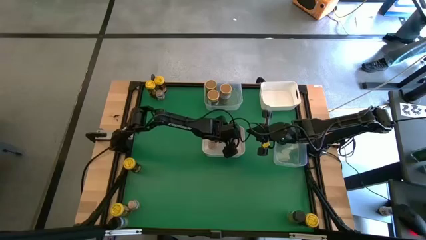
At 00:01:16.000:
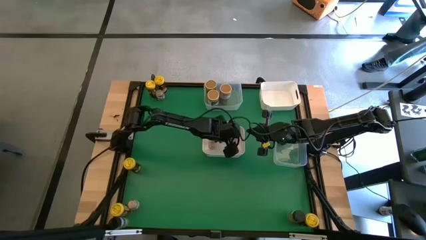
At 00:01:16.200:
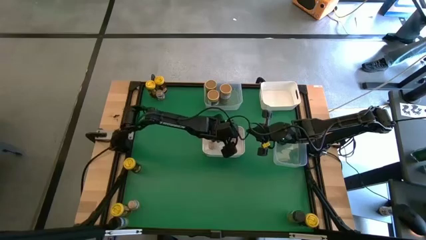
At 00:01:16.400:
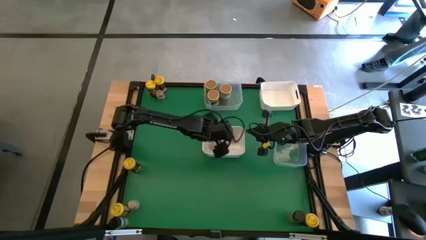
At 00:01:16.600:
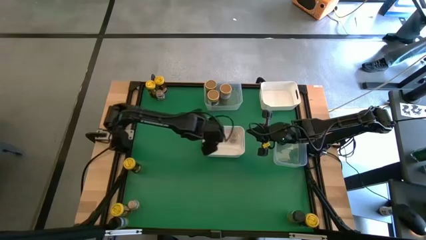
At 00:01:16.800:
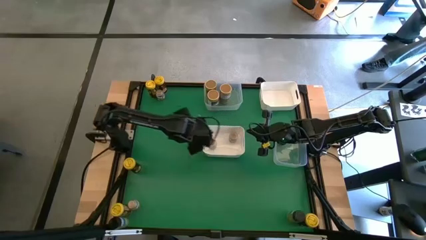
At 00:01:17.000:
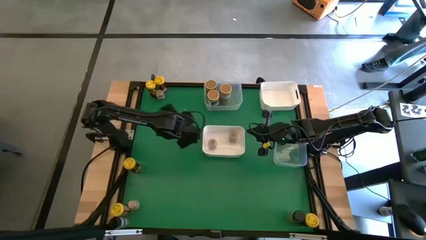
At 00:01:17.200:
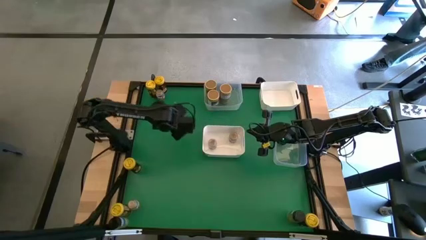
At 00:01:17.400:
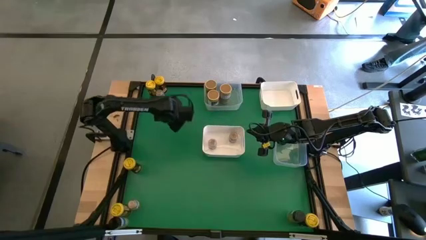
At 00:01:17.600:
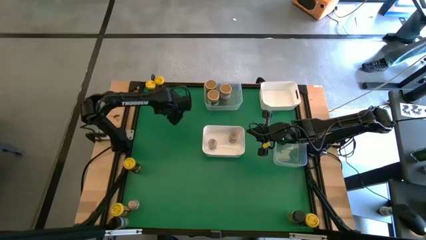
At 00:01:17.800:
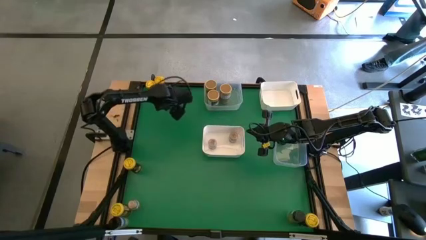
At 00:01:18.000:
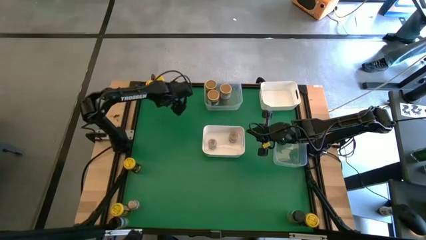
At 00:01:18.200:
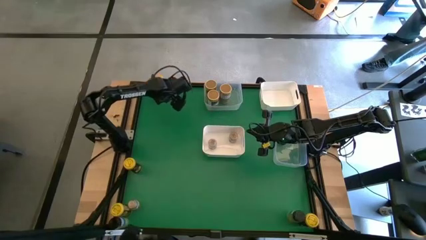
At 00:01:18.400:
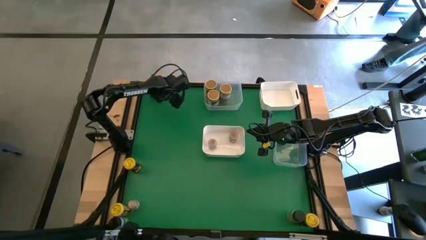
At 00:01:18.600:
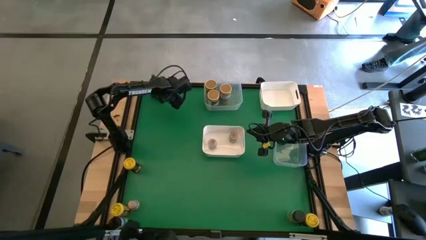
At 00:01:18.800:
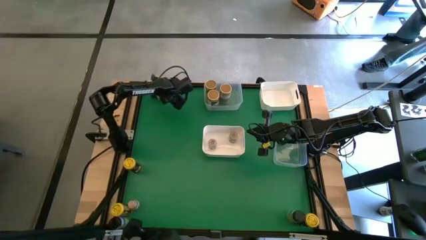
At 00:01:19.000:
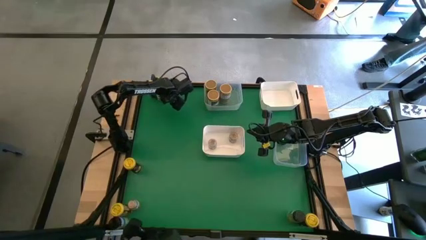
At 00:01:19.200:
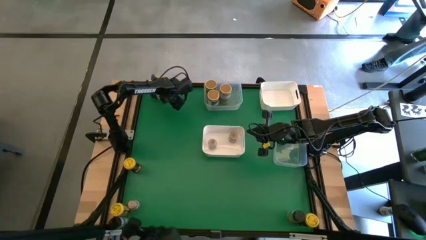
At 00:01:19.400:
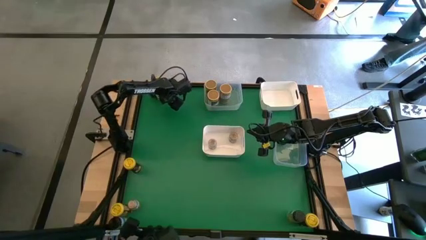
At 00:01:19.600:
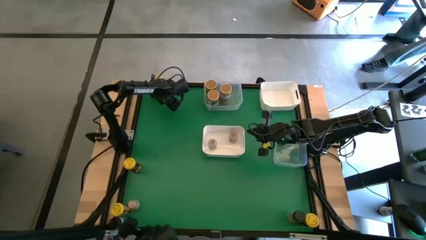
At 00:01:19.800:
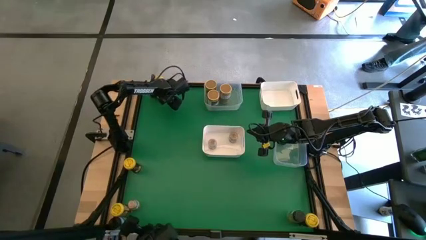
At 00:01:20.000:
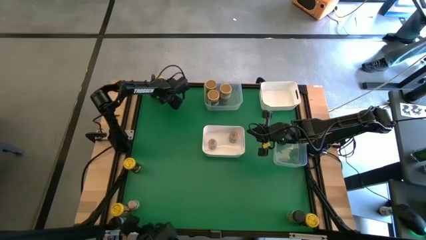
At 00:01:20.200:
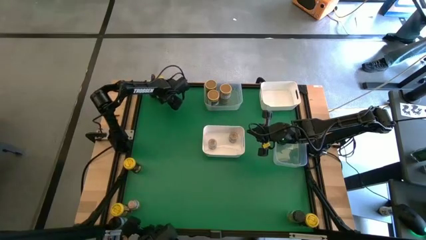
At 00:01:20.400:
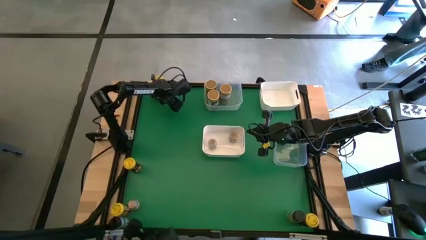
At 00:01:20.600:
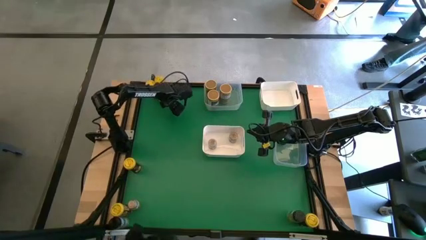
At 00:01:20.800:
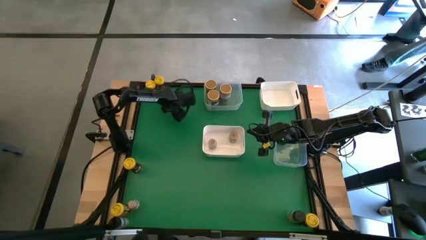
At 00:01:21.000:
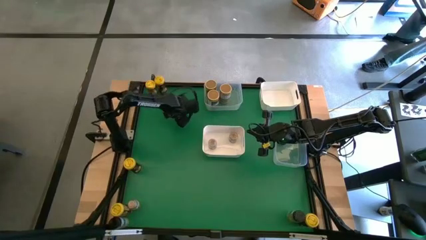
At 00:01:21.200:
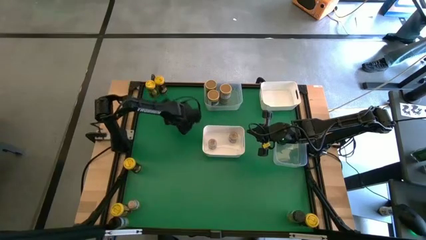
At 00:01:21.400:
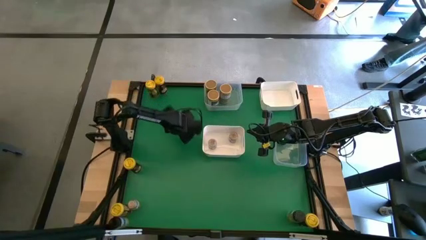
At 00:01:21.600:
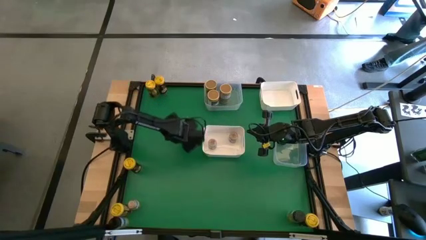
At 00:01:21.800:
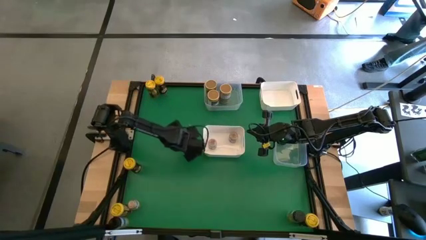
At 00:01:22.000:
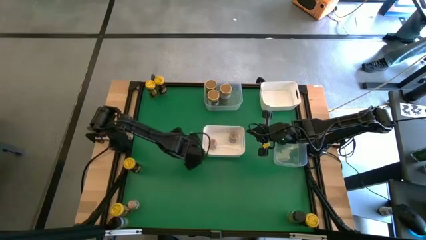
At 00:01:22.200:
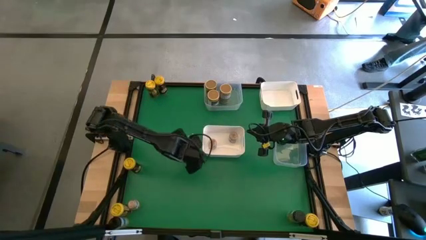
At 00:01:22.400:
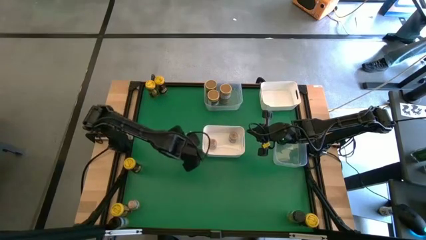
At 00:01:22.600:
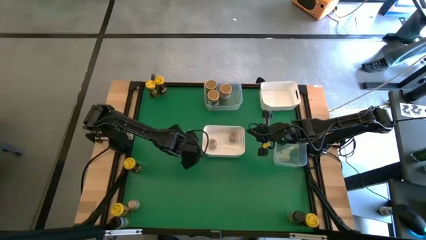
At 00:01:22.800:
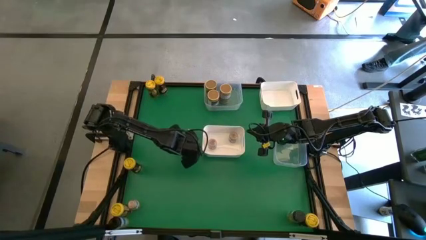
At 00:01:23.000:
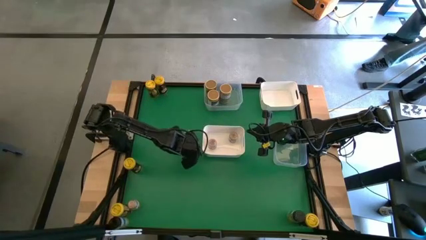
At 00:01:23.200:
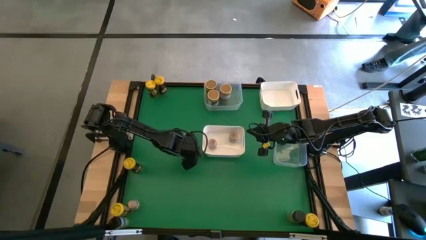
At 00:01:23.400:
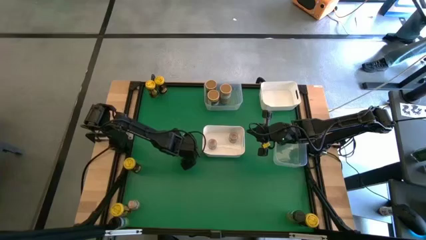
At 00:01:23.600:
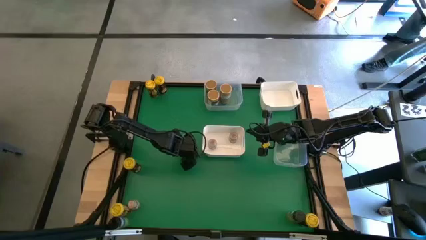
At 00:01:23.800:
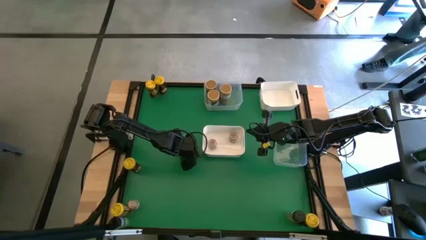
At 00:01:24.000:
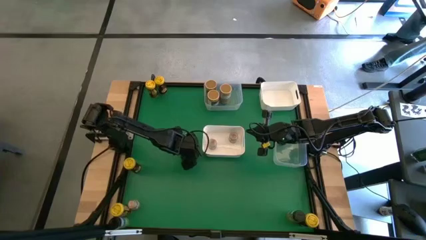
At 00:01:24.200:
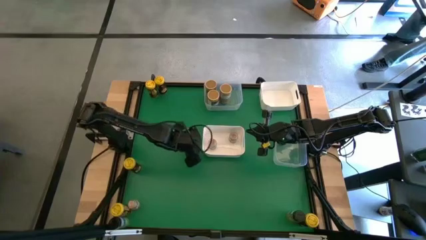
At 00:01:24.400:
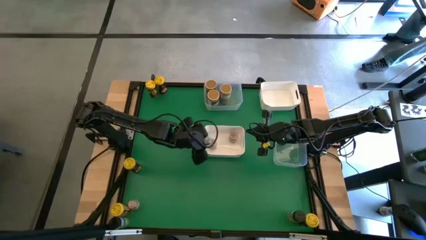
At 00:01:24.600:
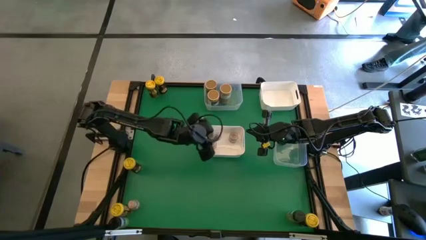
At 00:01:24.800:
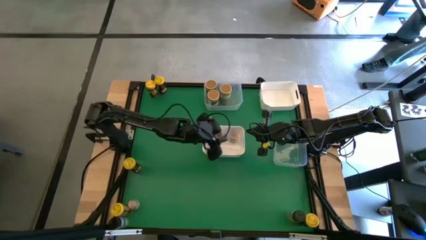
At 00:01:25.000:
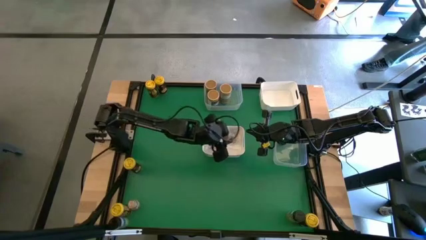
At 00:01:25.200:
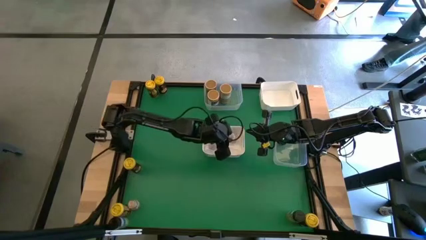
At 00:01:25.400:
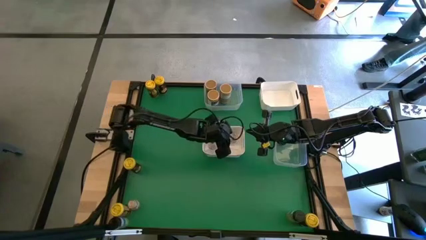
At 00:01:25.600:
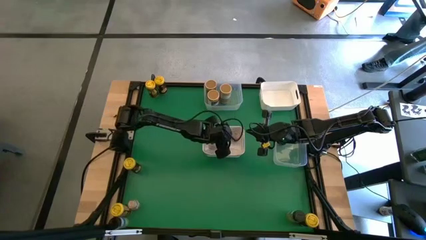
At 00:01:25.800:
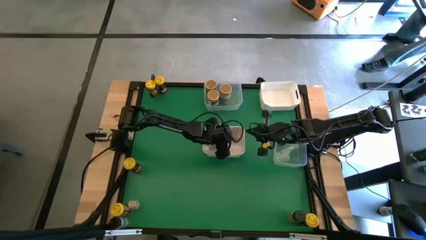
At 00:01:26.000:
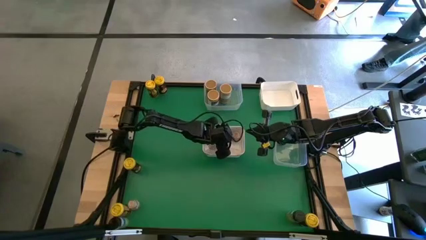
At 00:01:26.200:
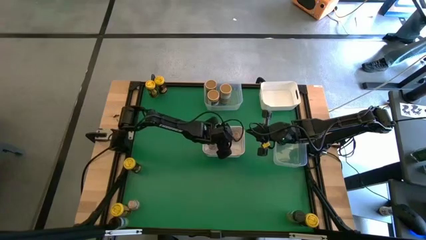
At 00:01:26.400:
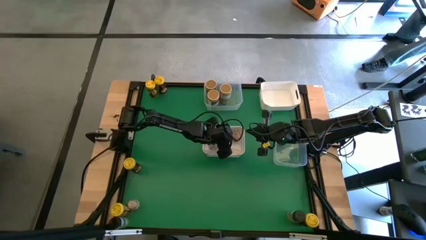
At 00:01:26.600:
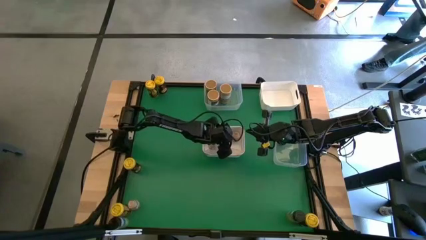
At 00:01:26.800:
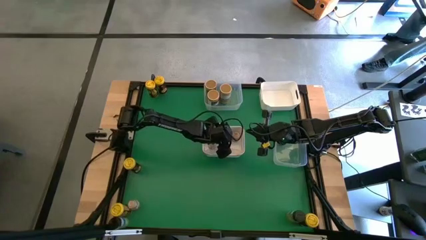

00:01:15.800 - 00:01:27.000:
Task: Sort spices by type
Put the brown seasoning bottle into the bottom white bin

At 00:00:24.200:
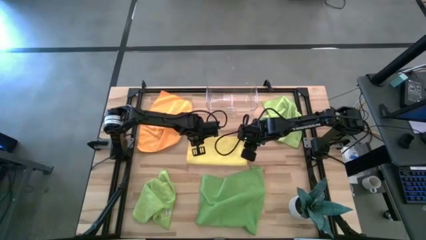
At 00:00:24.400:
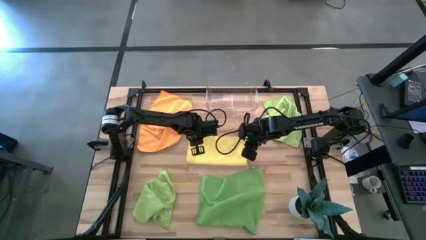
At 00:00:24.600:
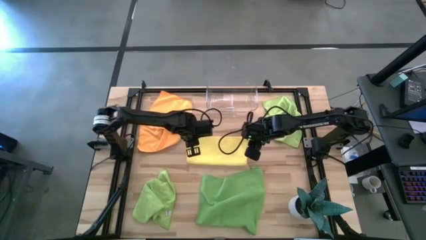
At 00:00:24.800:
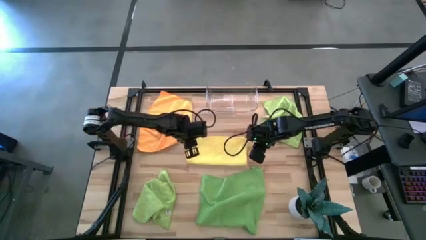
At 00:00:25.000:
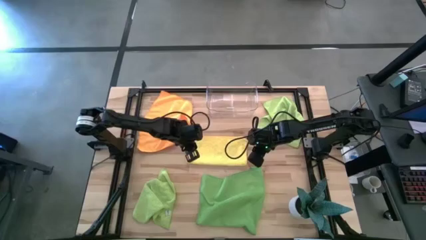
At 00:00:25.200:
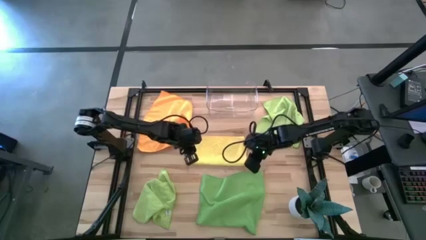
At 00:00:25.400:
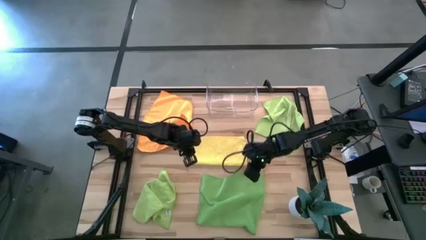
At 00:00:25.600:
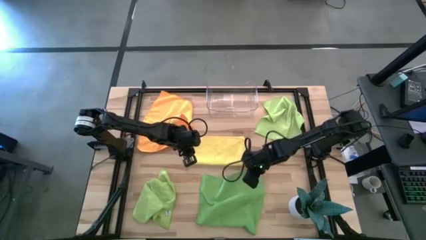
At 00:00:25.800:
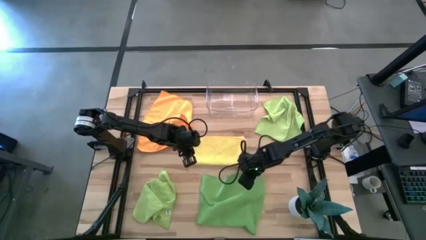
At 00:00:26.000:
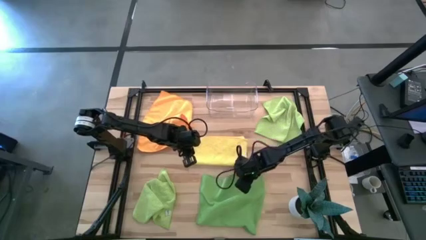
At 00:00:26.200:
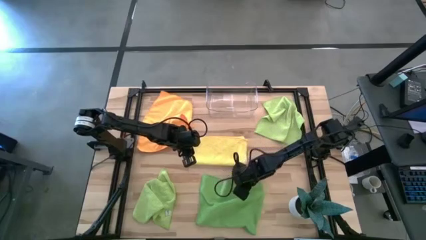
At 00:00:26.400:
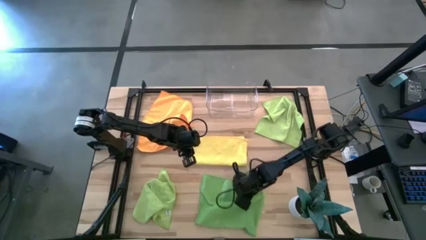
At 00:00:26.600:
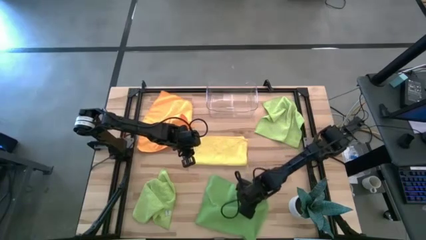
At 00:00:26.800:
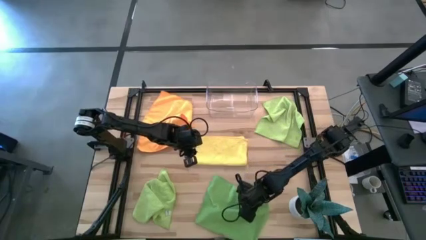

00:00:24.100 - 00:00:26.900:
Task: Fold microfiber towels
Adjust the yellow microfiber cloth
